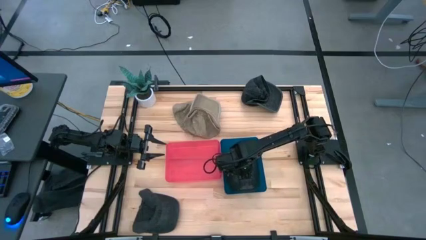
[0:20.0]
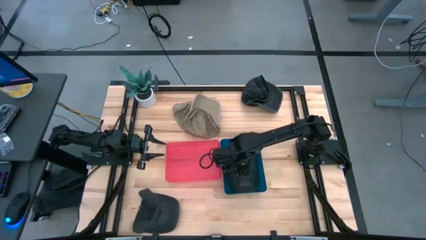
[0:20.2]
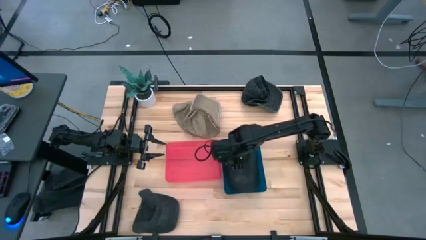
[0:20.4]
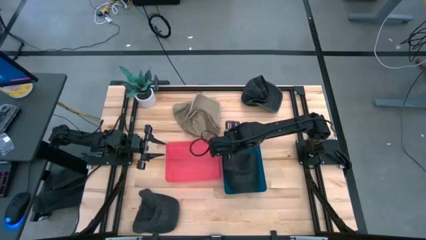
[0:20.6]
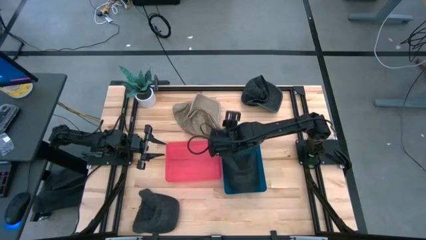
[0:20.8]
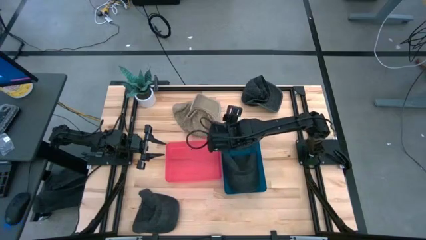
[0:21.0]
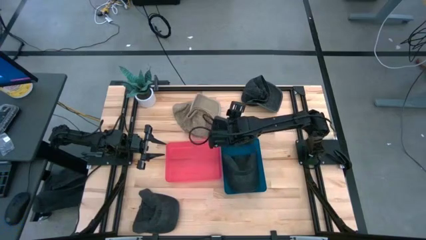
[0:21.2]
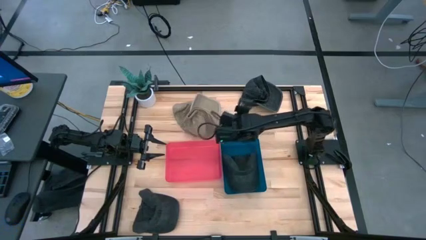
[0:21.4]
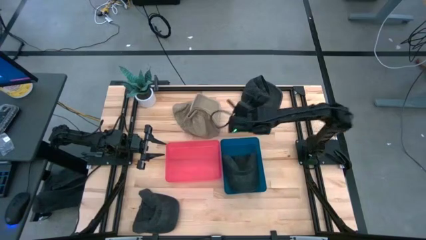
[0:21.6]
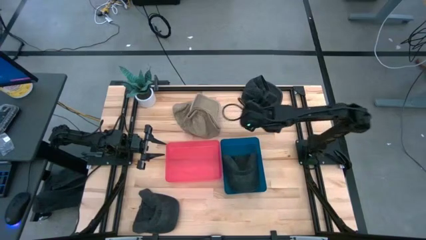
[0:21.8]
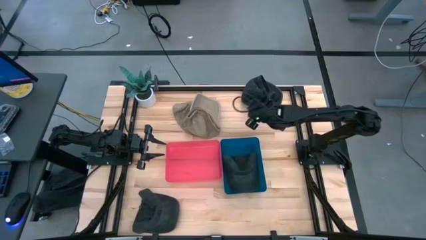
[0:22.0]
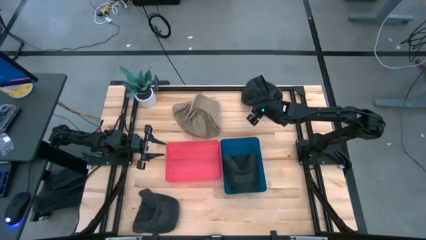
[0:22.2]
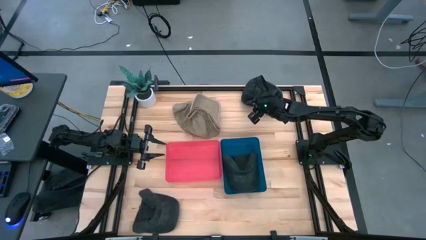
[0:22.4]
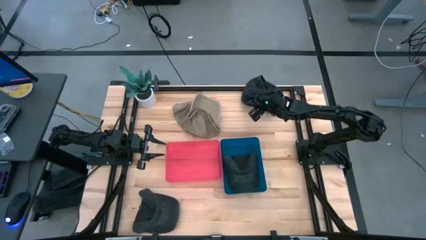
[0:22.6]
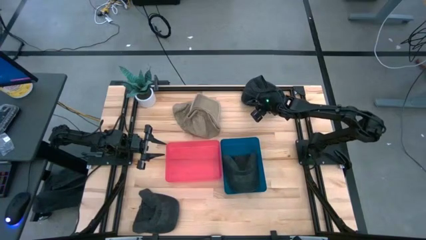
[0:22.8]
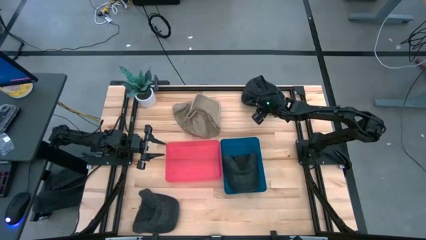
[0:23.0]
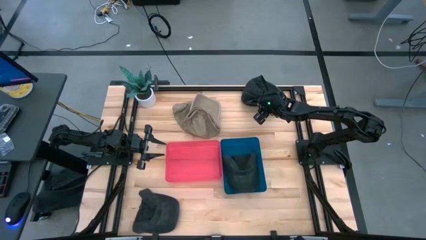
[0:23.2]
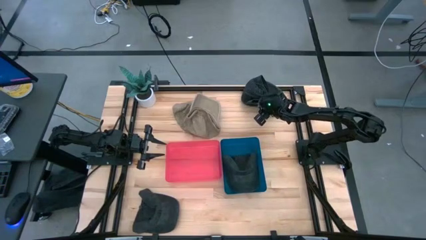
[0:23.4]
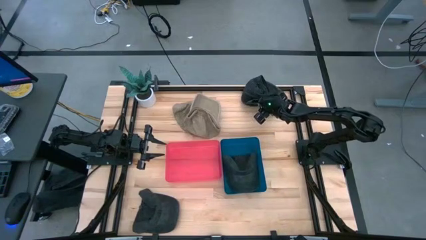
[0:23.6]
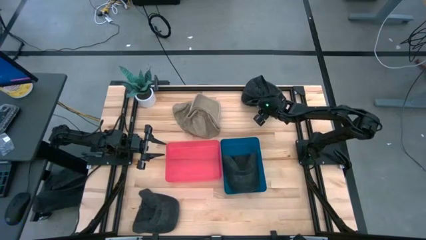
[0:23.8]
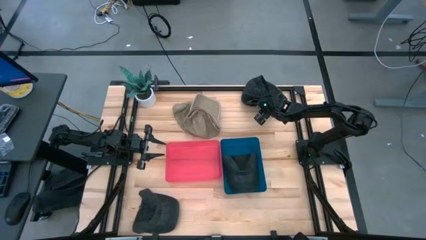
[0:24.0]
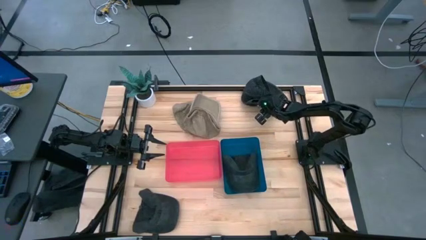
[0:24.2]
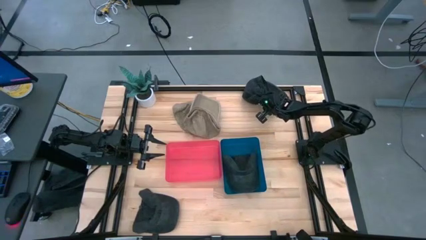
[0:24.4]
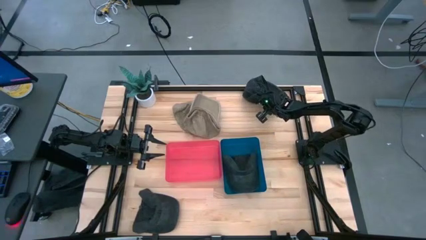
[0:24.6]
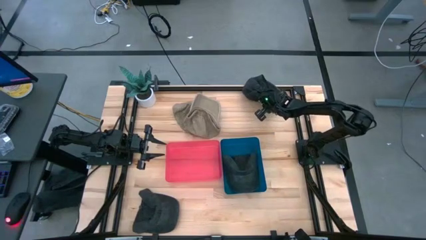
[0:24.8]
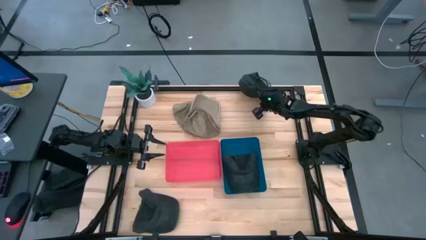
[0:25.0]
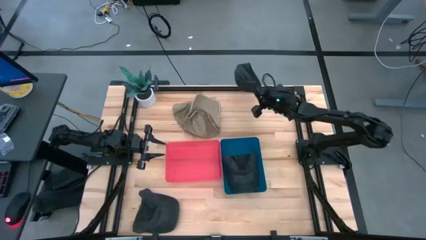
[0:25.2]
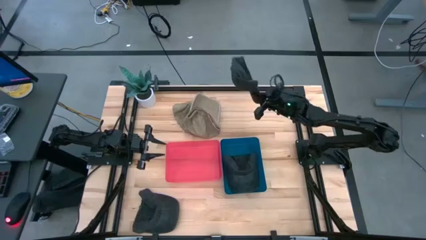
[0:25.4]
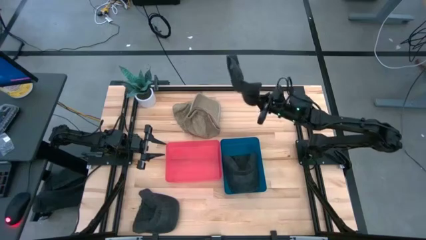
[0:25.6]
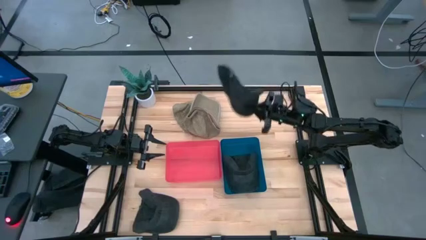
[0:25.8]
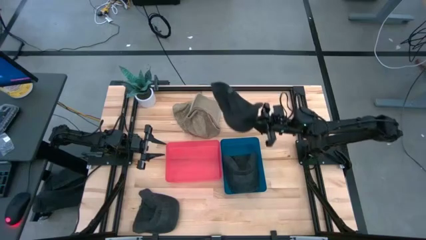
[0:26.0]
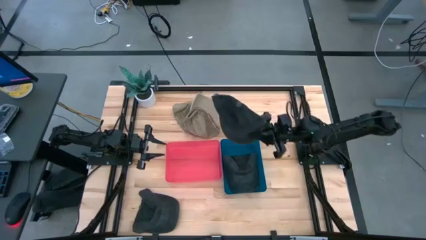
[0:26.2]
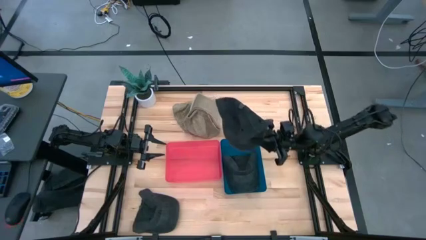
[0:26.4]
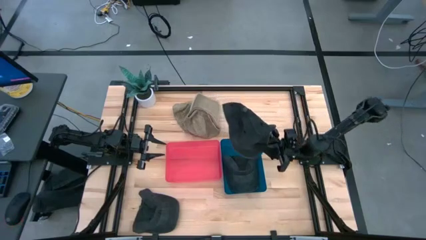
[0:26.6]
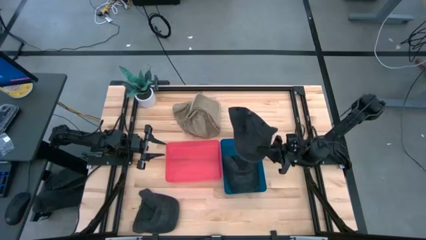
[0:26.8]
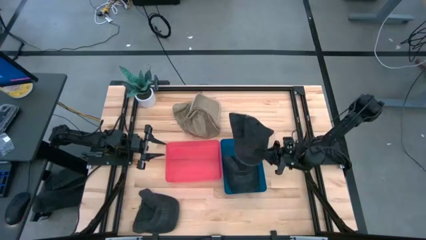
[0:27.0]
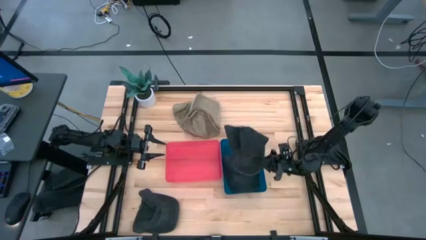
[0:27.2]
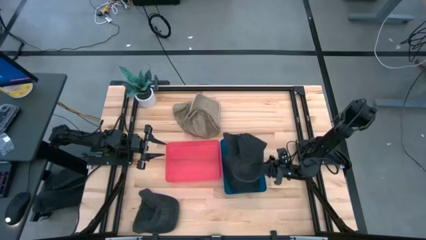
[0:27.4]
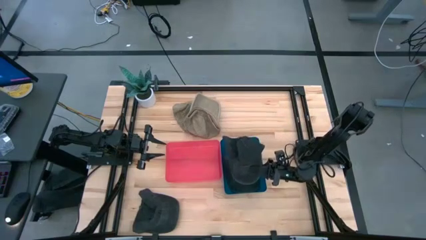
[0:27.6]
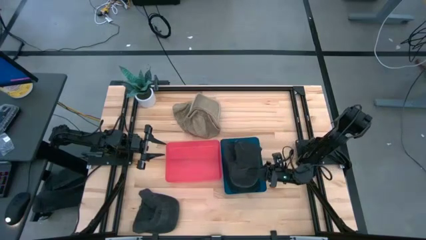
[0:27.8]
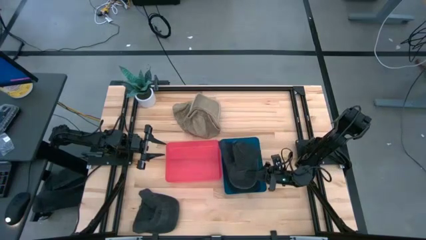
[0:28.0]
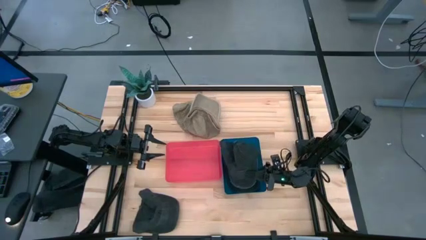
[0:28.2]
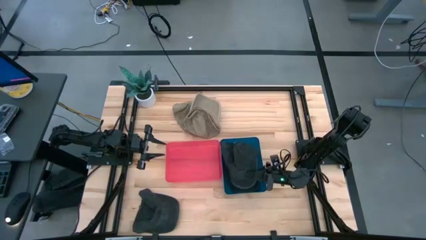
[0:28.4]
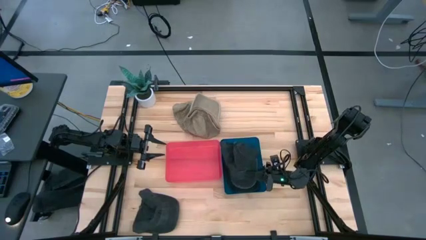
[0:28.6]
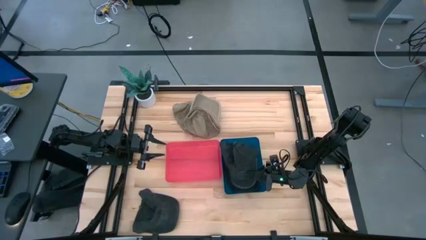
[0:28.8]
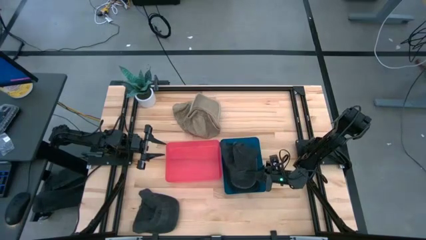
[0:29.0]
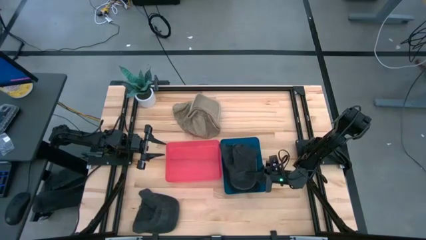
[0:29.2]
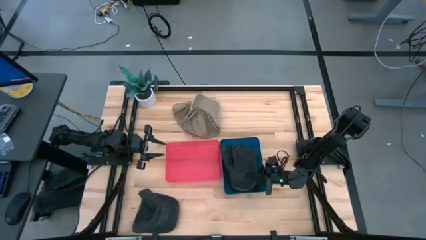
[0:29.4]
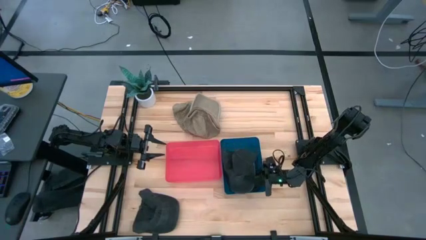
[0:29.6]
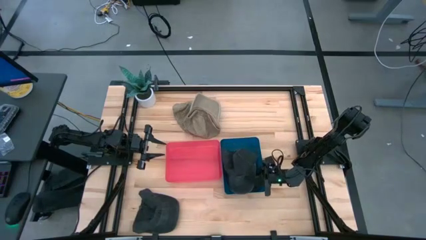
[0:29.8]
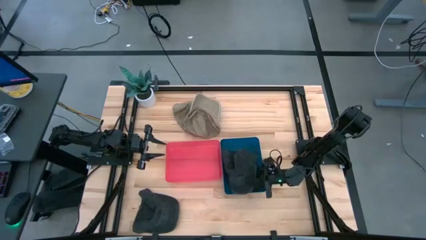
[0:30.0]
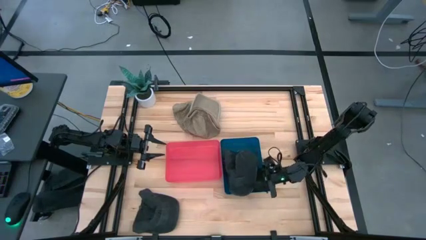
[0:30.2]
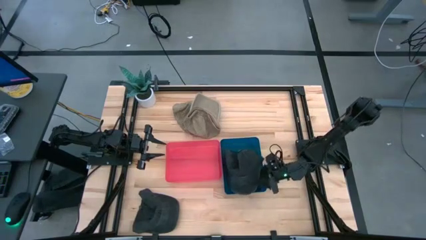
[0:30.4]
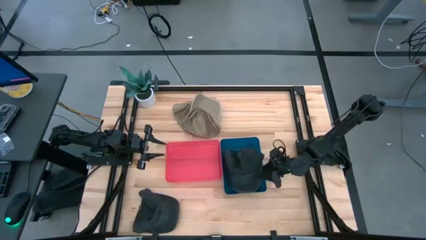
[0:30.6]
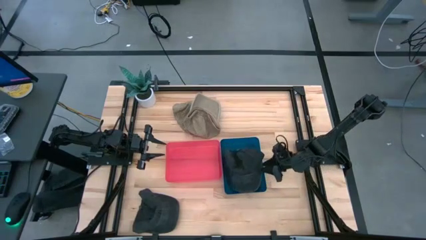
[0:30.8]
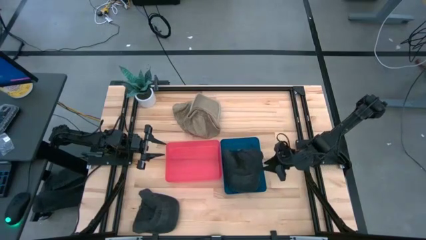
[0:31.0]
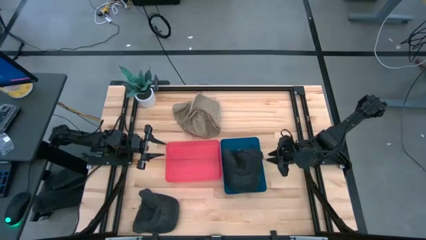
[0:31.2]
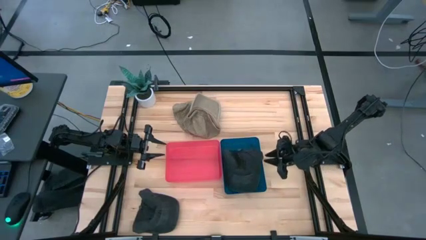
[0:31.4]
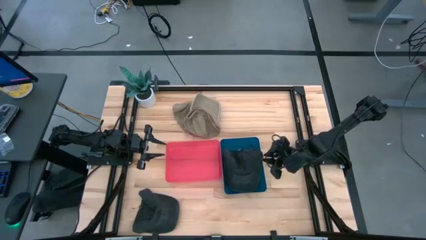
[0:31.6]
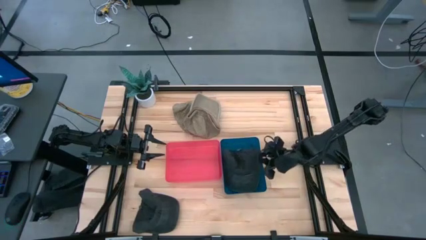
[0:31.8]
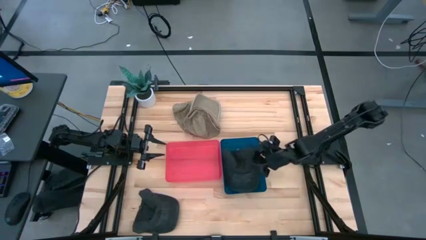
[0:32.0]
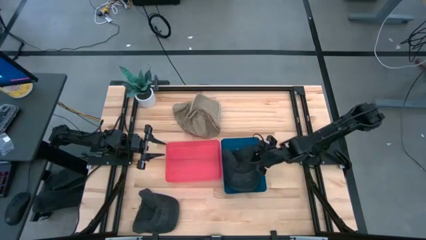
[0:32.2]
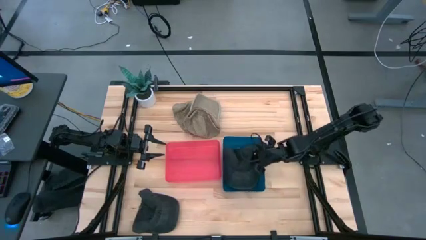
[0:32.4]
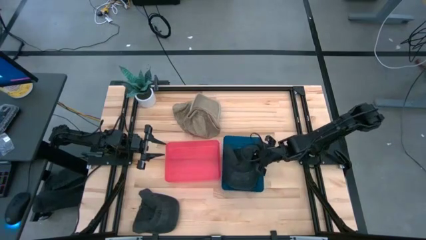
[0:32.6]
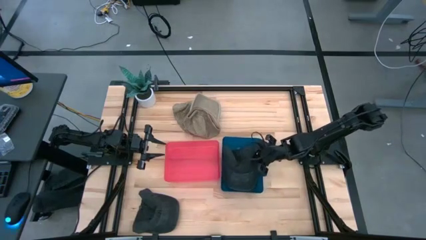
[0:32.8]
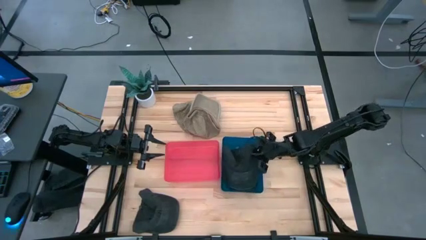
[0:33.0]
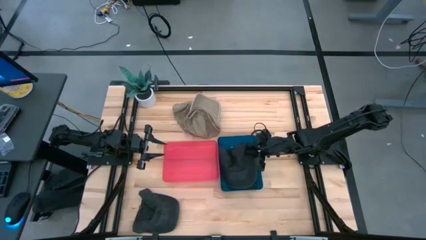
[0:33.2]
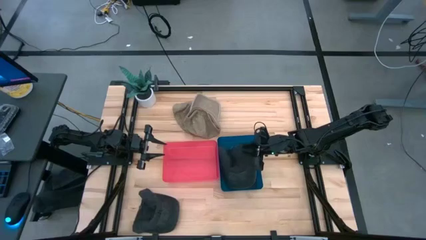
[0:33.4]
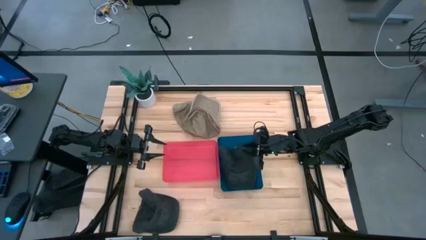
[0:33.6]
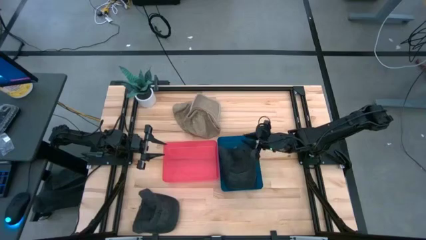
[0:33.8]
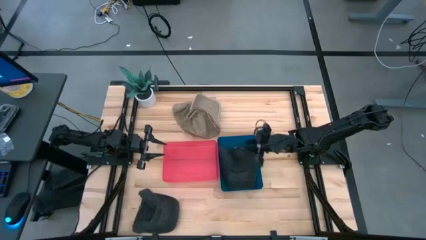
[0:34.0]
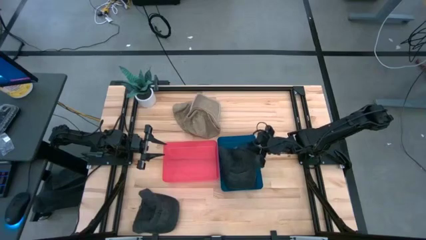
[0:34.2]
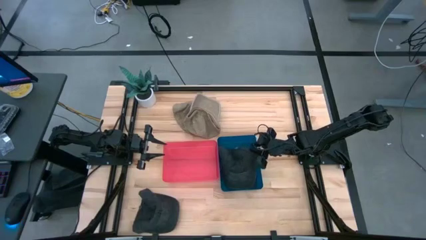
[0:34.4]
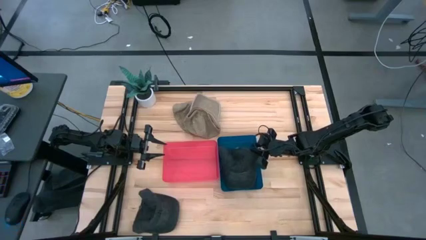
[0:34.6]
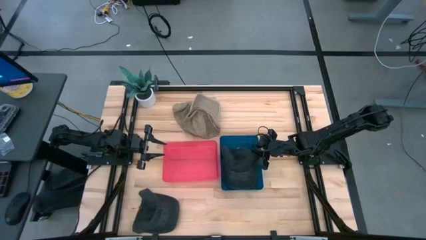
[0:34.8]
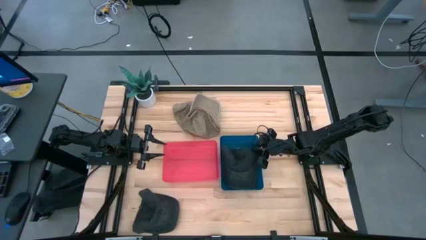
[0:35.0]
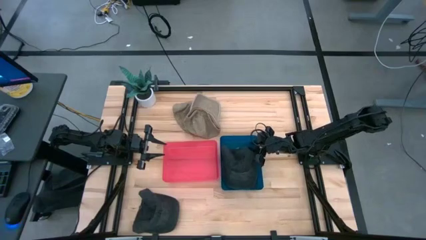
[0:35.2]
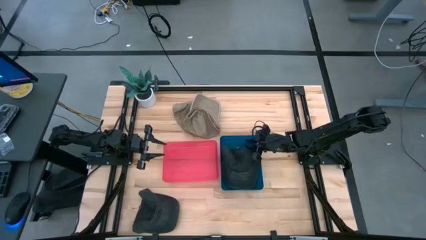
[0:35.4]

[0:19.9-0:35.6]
Task: Pick & Place hat
Put the top black cap into the blue bin
